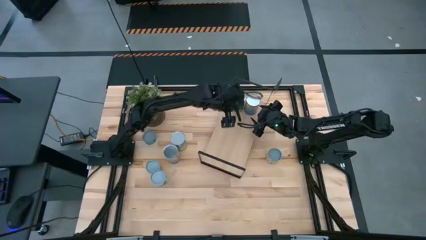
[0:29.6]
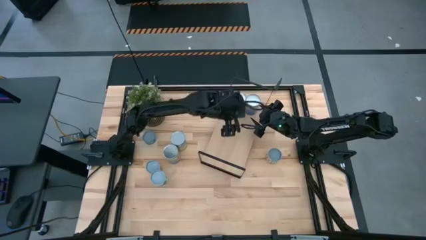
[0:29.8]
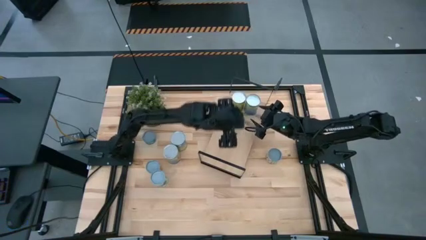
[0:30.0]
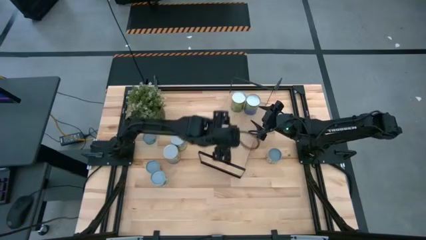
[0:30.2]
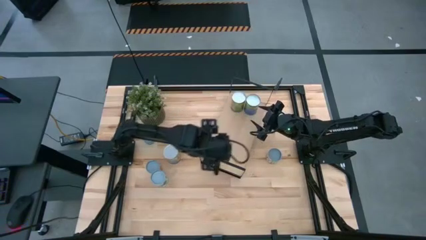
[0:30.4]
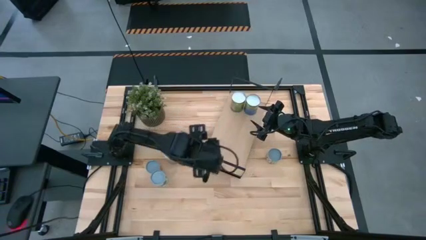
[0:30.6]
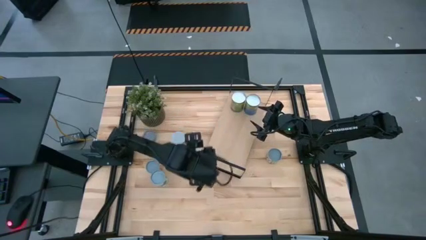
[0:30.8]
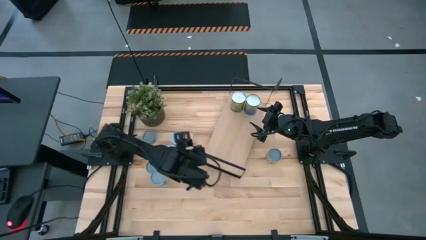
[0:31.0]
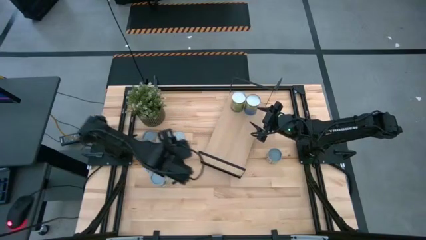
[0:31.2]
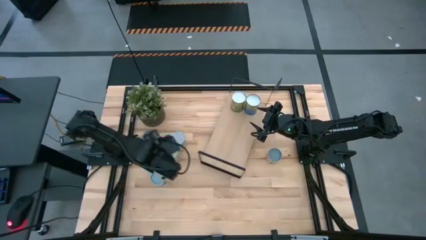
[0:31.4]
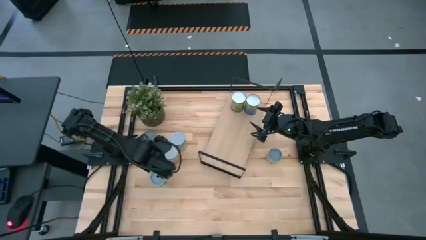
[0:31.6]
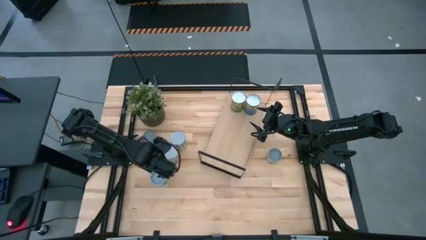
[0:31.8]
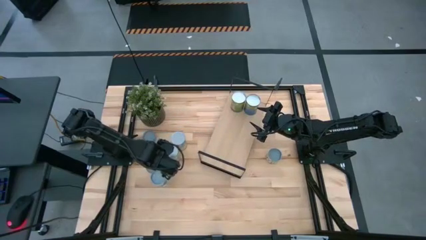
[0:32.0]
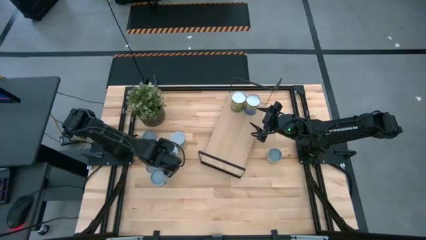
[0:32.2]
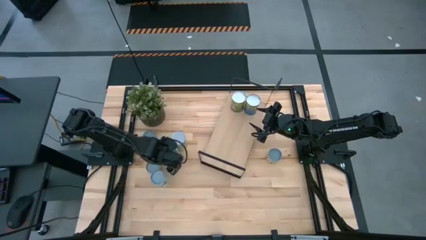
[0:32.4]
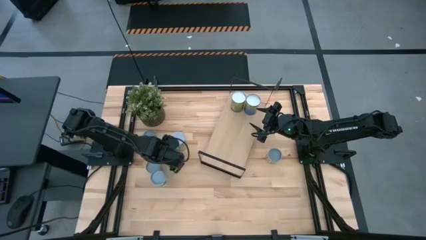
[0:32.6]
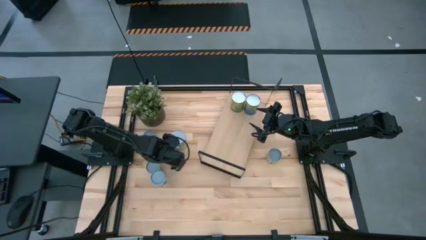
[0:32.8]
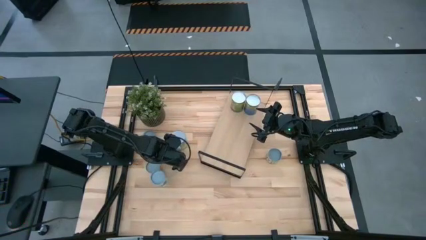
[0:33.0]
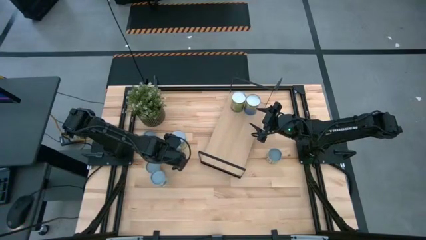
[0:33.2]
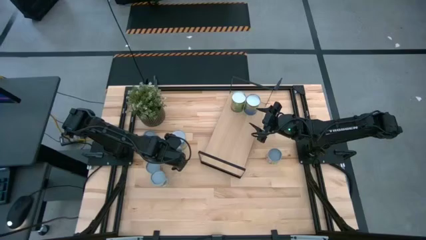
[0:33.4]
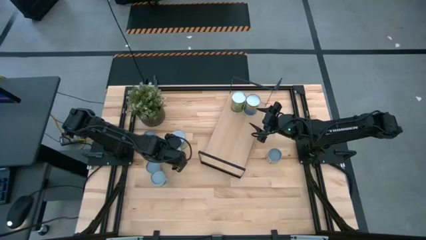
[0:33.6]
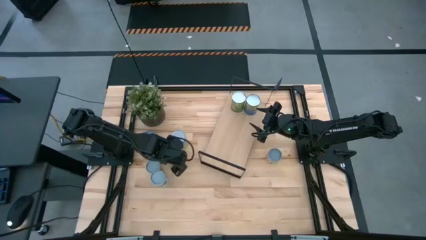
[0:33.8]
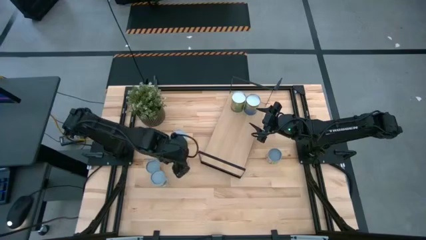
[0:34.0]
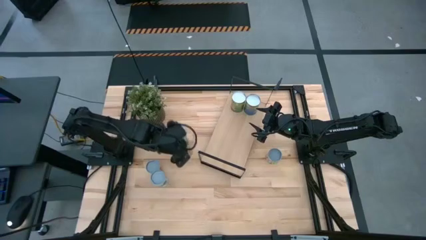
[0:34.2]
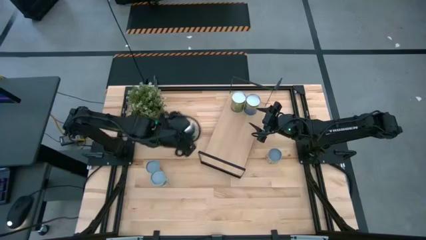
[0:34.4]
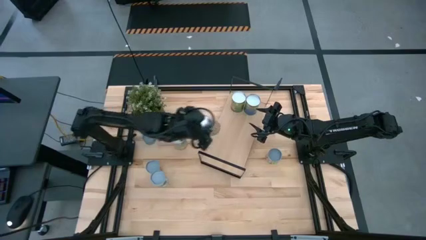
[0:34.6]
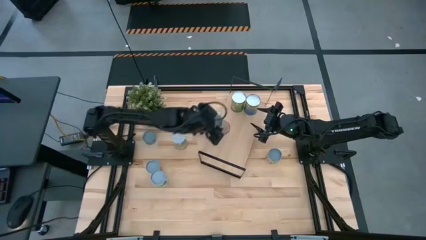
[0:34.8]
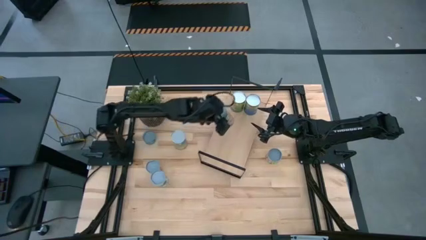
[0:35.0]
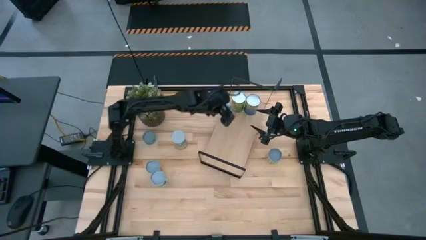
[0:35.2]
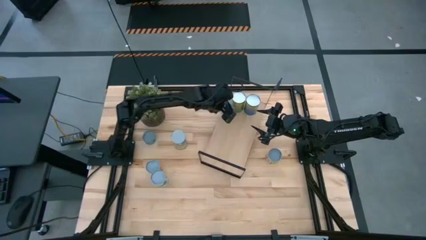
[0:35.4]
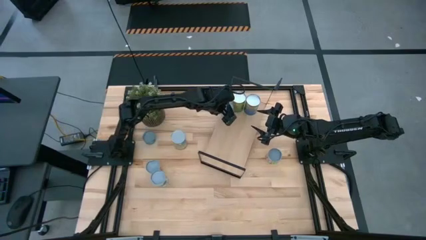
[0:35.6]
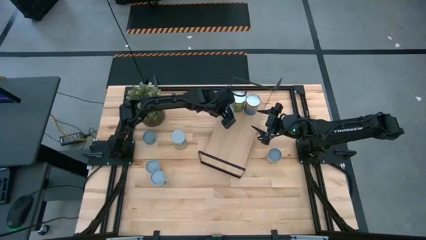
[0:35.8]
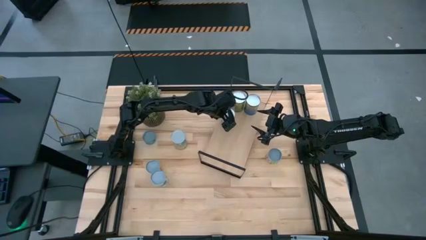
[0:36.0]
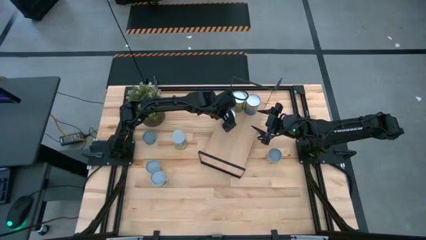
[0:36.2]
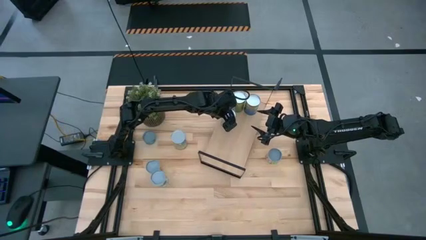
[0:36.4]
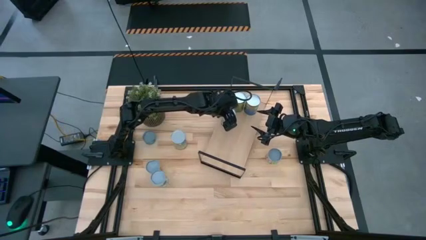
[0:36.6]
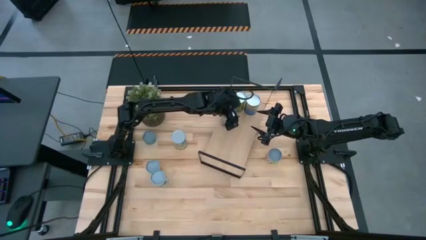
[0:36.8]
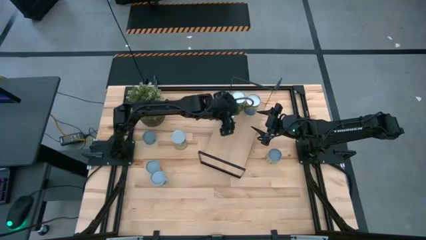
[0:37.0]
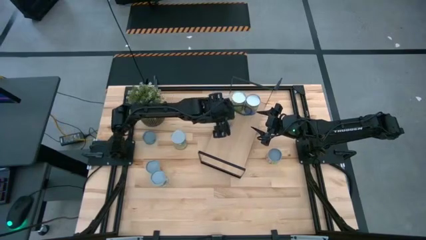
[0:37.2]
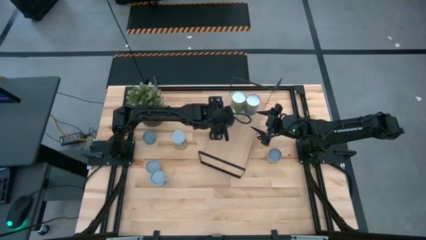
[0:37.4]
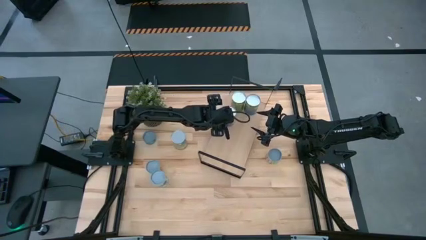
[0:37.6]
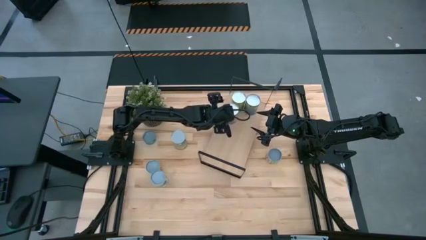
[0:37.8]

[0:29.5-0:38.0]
Task: Pick and place cans onto a shelf
Put the canned peaches on the shelf

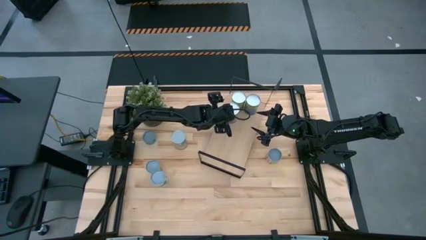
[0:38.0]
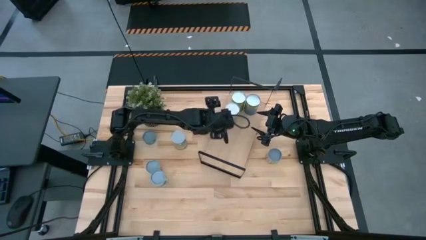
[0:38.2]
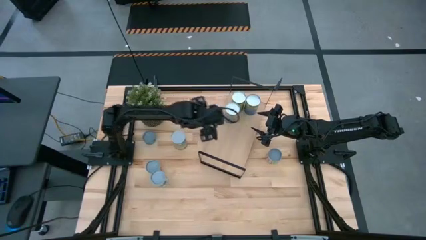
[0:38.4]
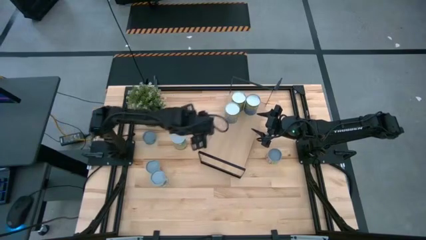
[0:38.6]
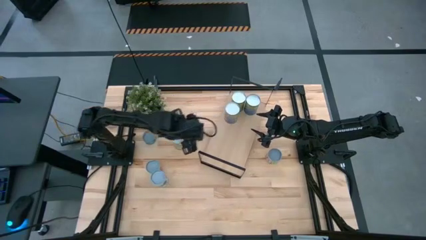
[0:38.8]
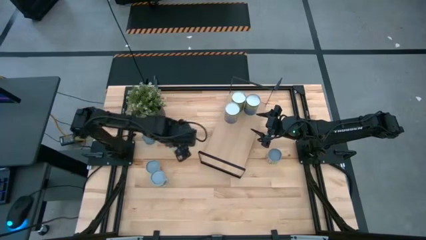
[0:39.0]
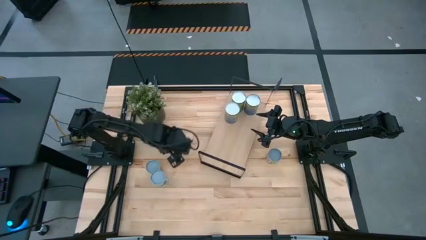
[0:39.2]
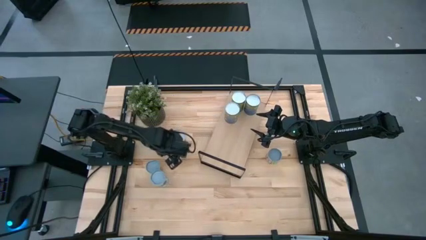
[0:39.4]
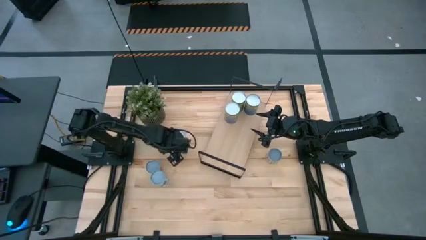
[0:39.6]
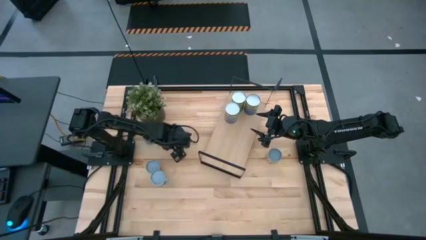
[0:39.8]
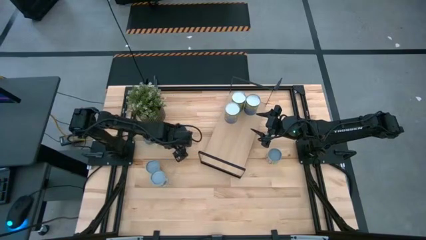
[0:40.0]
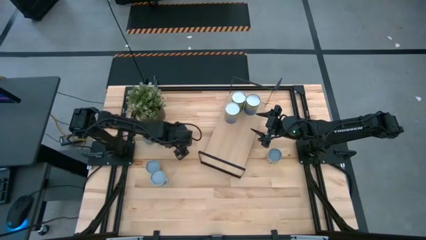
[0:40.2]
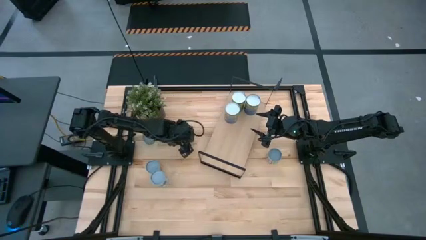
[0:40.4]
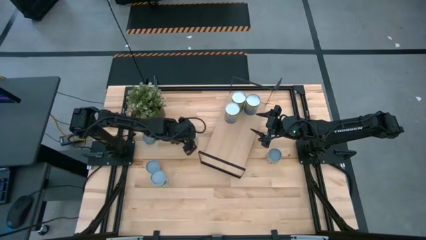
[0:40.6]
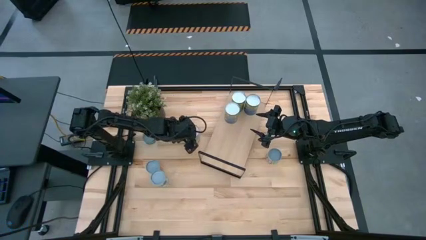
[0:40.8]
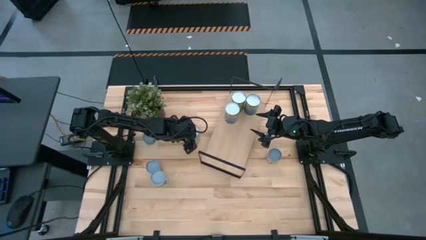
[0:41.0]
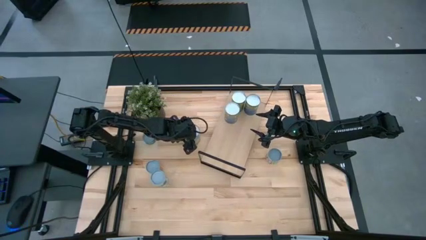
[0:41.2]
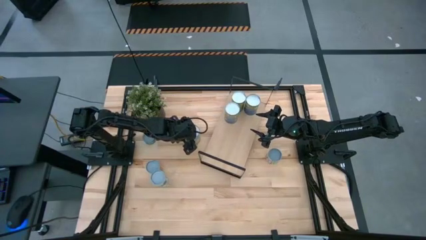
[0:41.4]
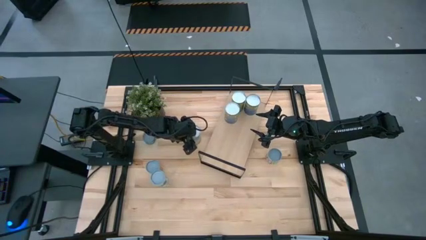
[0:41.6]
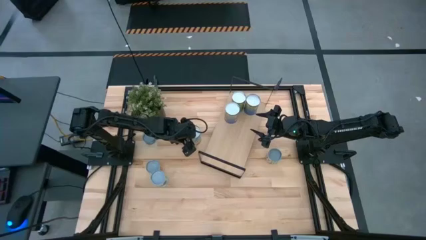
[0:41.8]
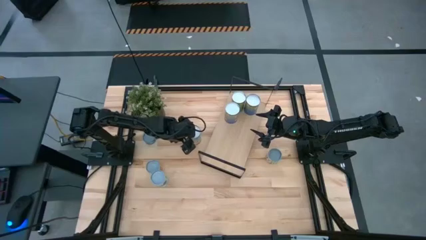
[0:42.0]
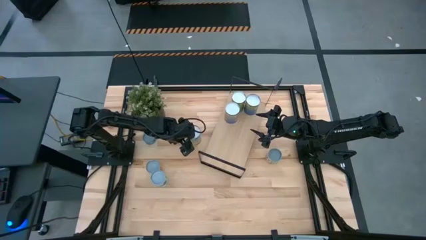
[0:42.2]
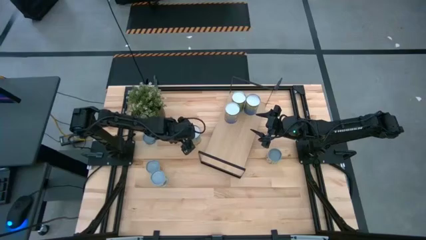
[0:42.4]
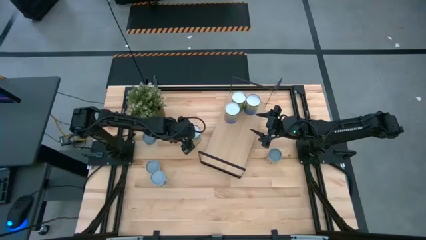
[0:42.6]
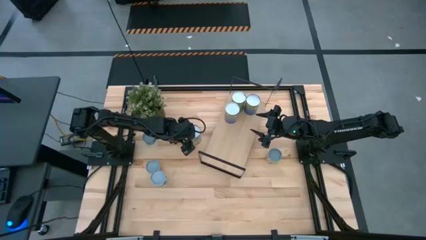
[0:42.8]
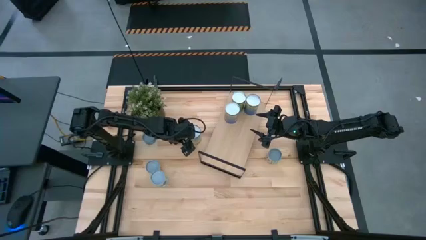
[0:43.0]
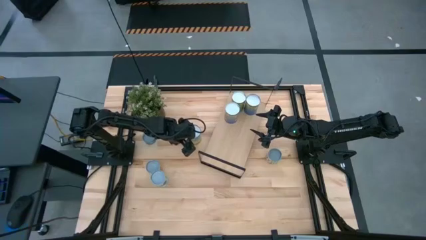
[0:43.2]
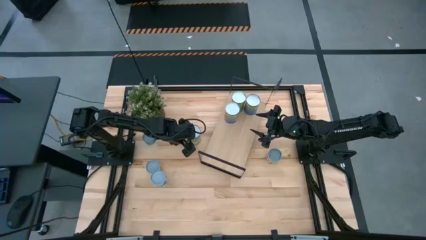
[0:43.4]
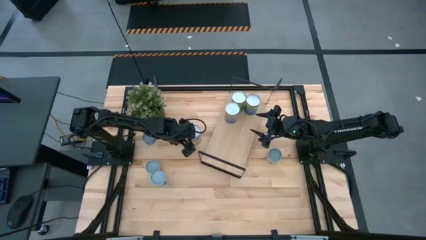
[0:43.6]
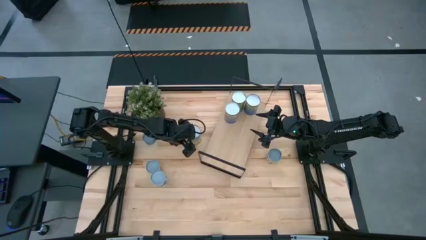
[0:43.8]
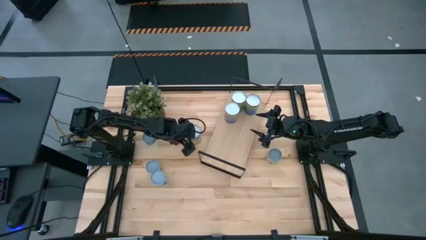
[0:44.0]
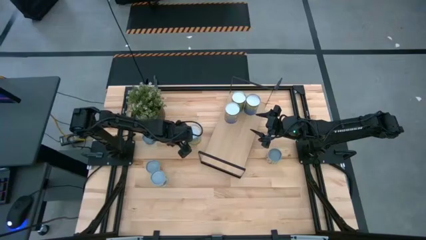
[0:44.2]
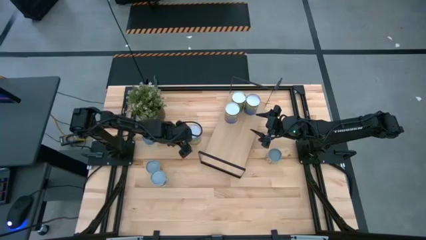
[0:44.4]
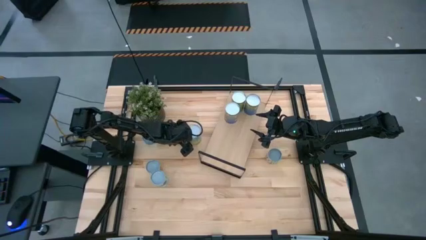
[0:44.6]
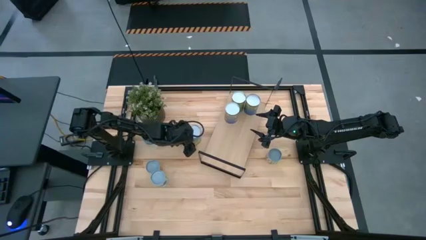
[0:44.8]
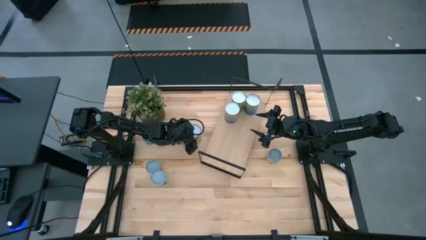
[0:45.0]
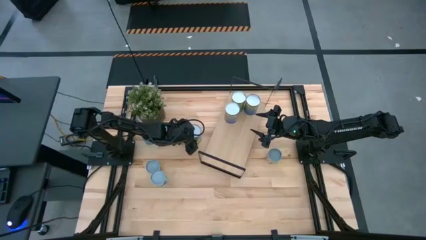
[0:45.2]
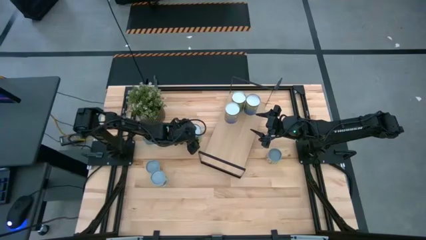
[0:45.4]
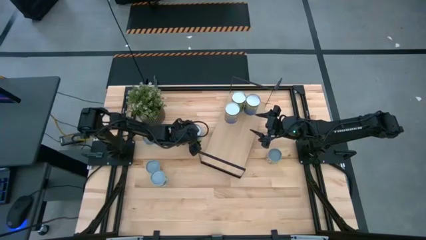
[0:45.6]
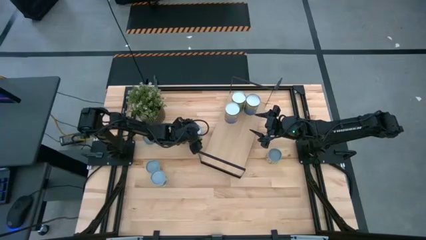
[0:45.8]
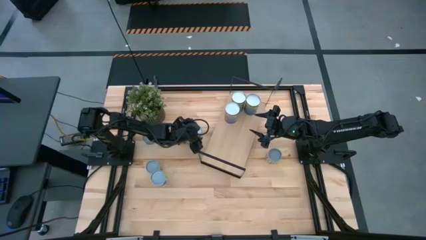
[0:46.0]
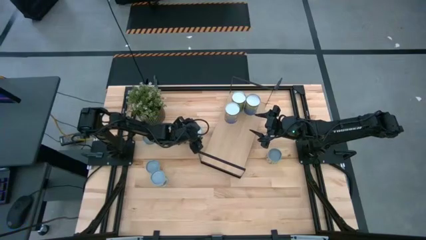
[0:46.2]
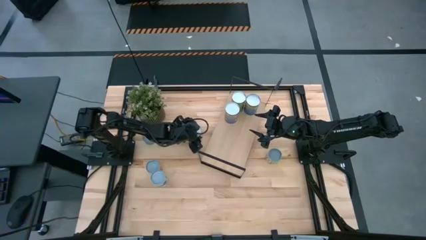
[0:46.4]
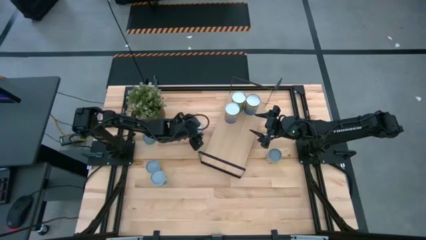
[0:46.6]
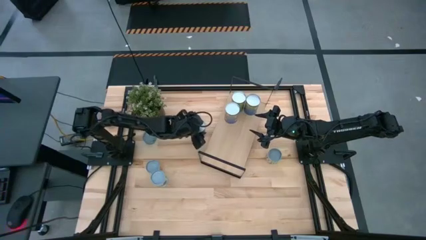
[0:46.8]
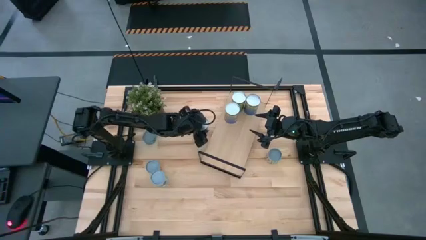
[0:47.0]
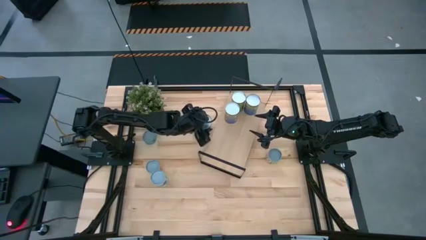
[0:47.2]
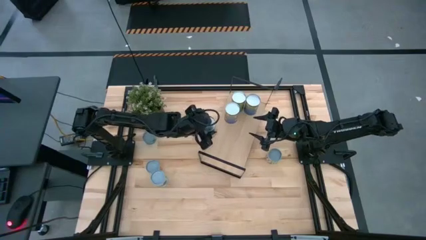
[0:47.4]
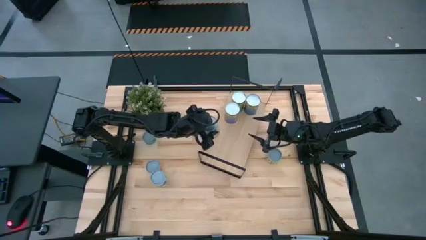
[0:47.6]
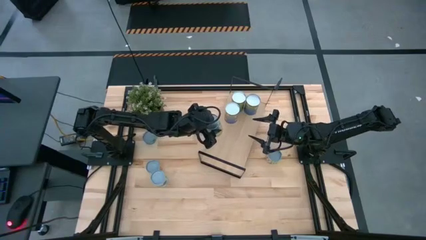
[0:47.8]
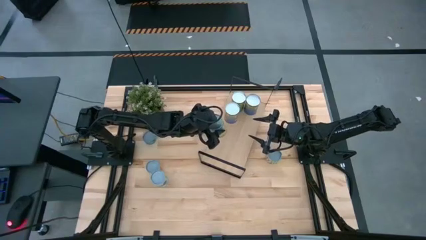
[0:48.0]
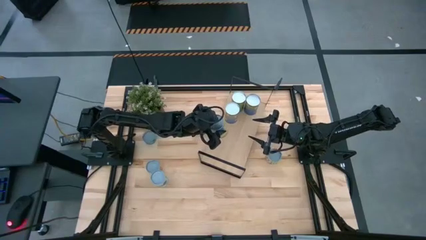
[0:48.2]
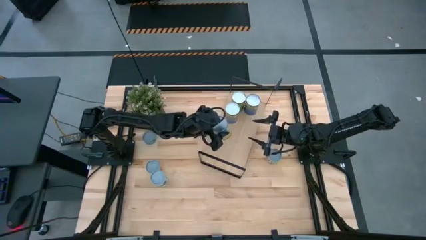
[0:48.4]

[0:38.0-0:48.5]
Put the canned carrots on the shelf
